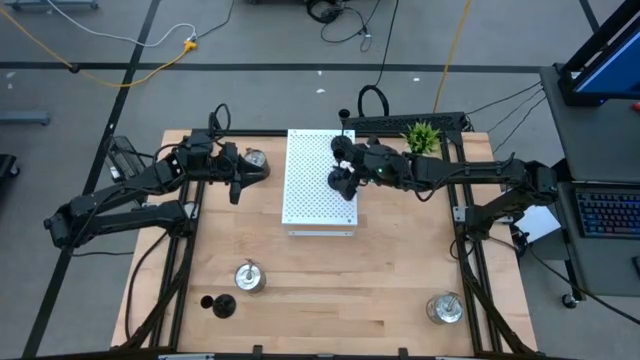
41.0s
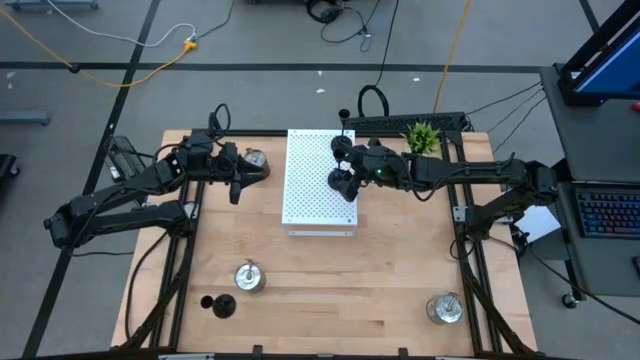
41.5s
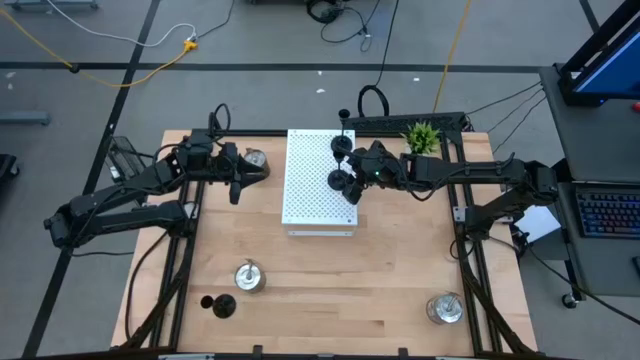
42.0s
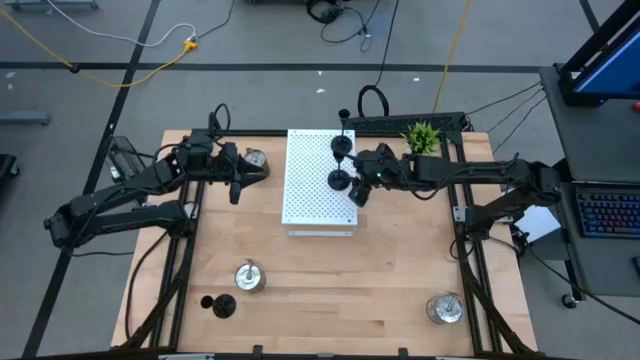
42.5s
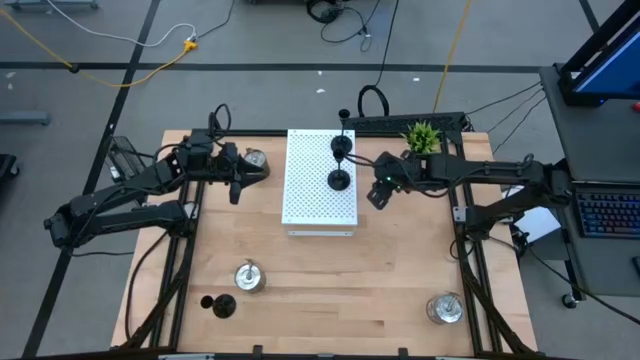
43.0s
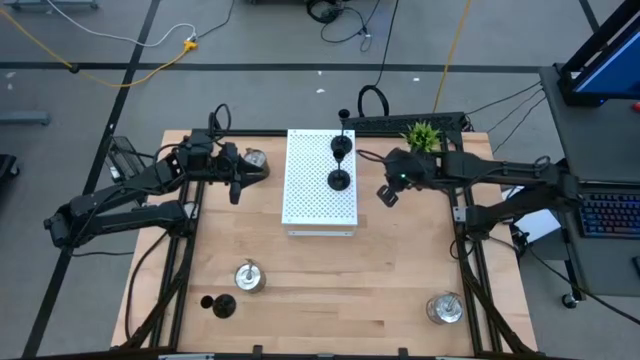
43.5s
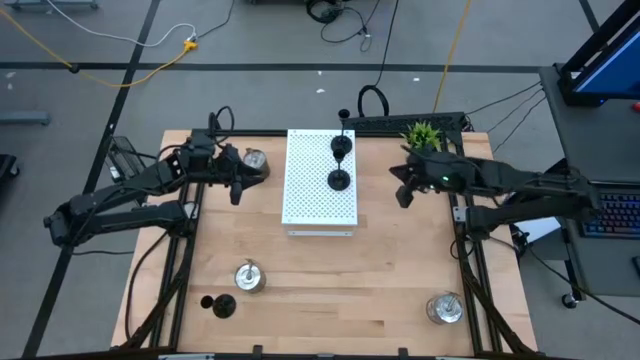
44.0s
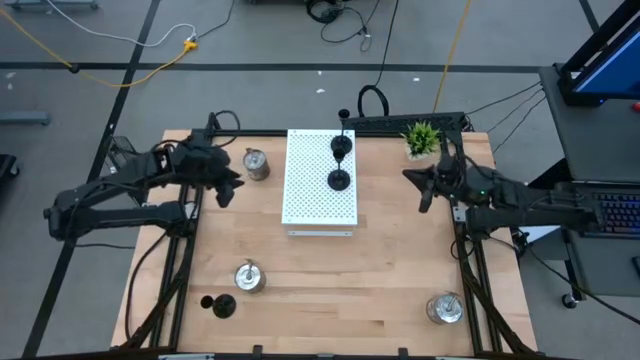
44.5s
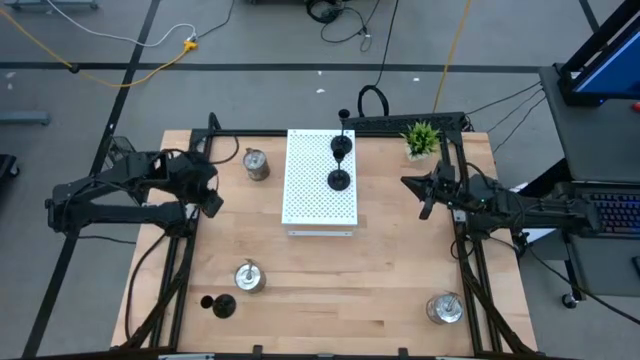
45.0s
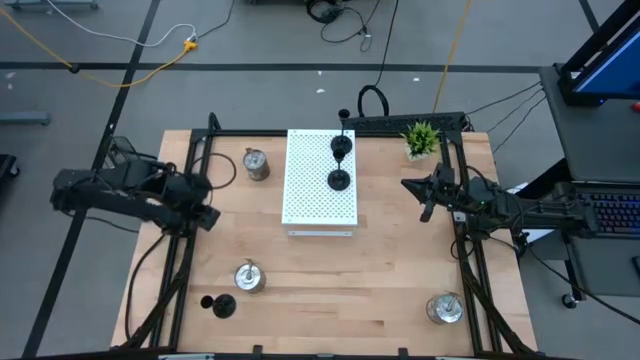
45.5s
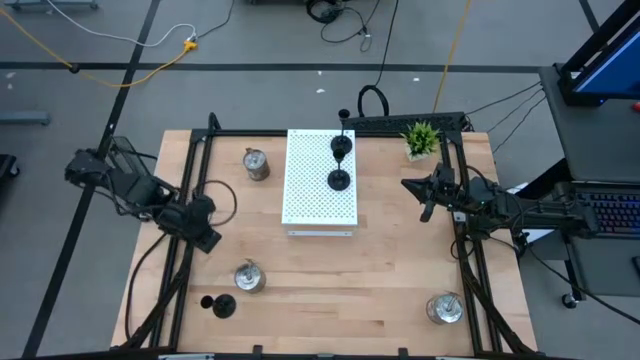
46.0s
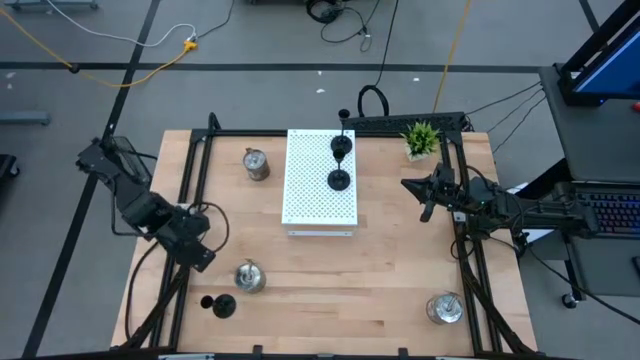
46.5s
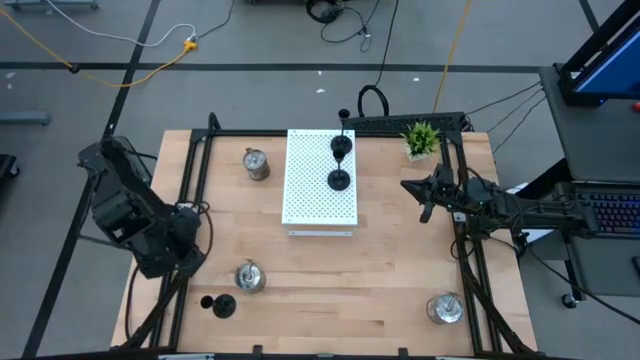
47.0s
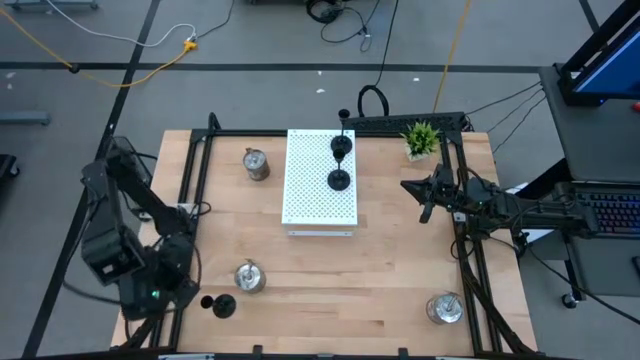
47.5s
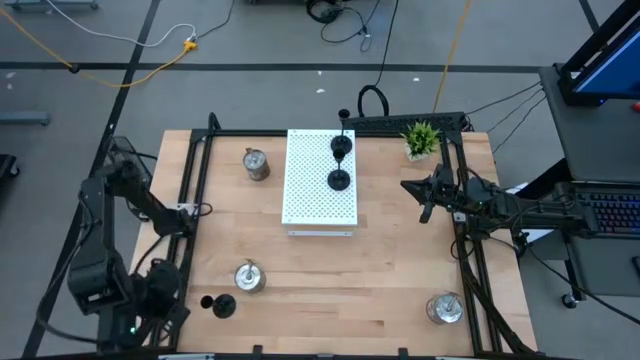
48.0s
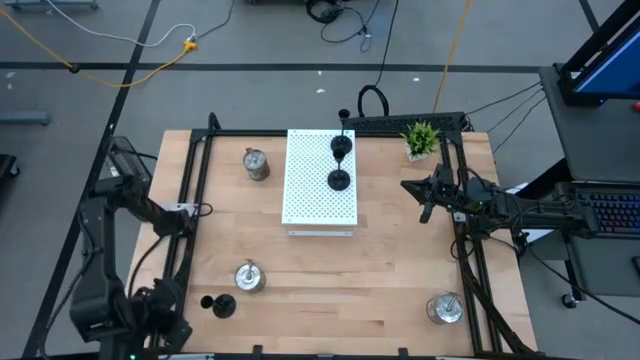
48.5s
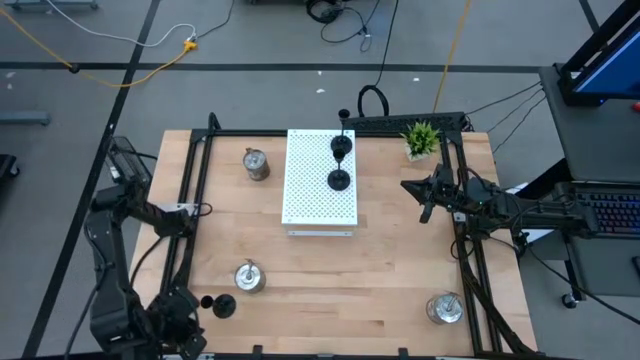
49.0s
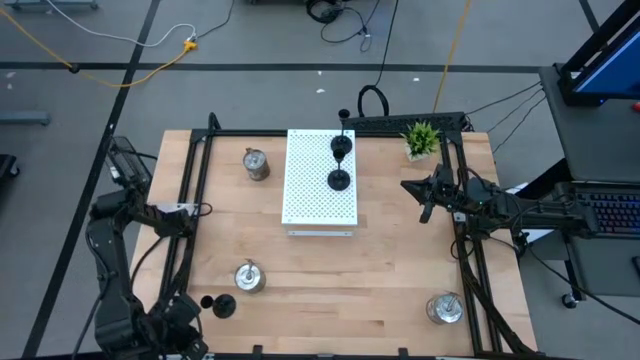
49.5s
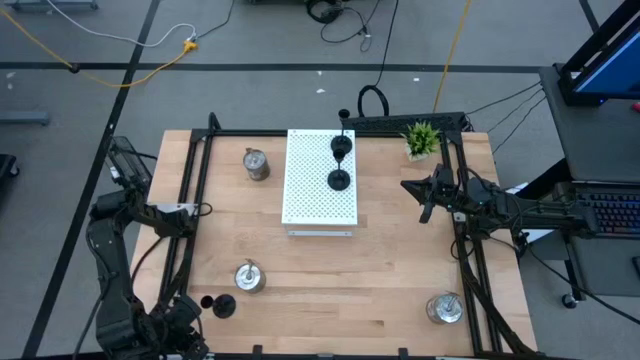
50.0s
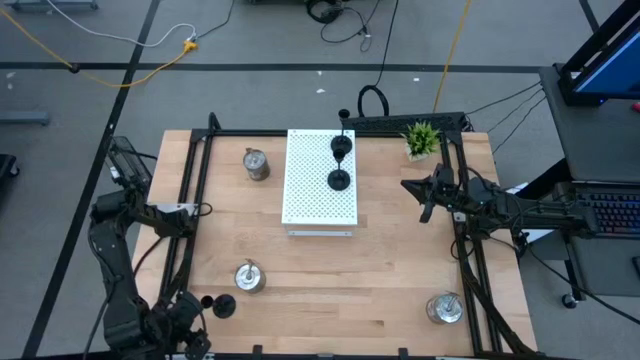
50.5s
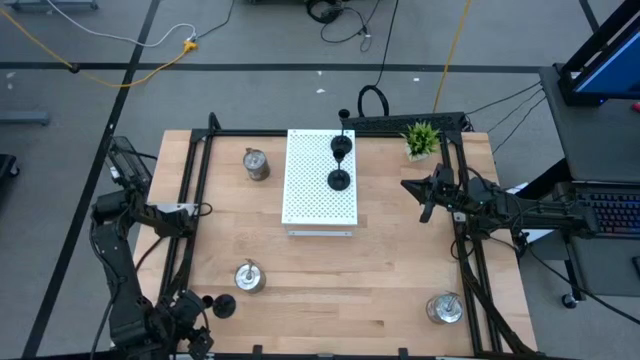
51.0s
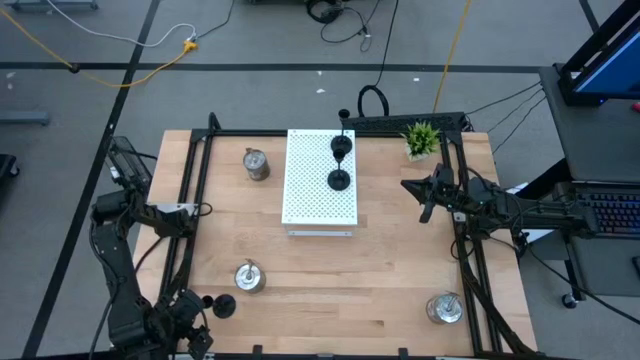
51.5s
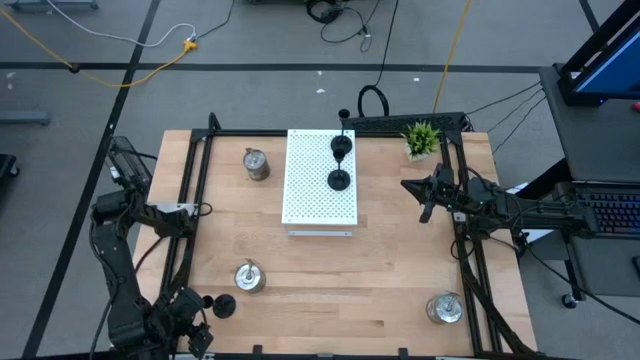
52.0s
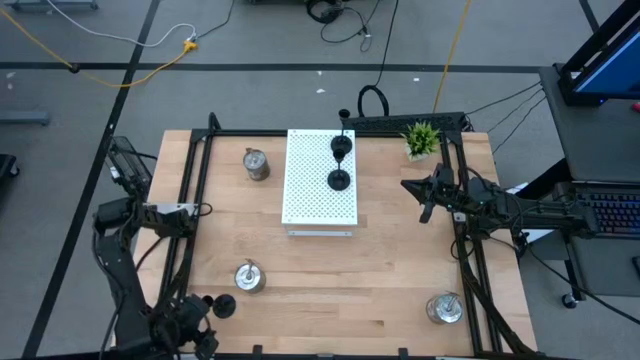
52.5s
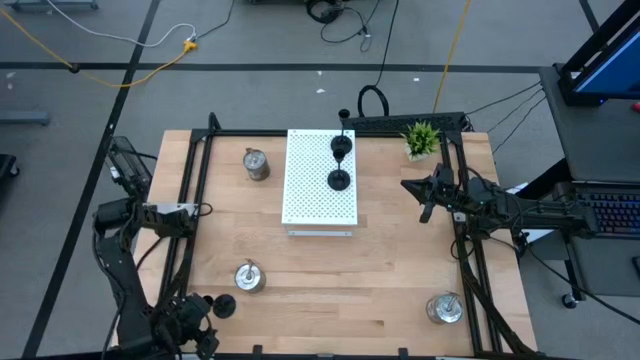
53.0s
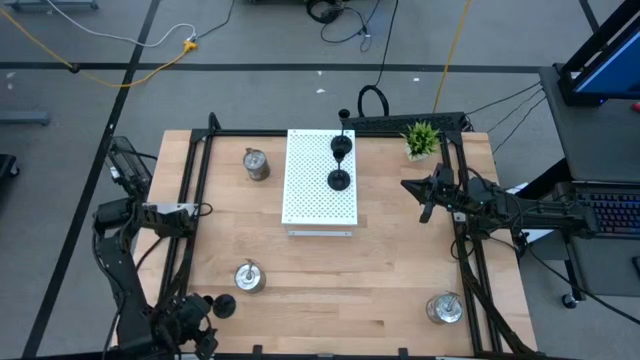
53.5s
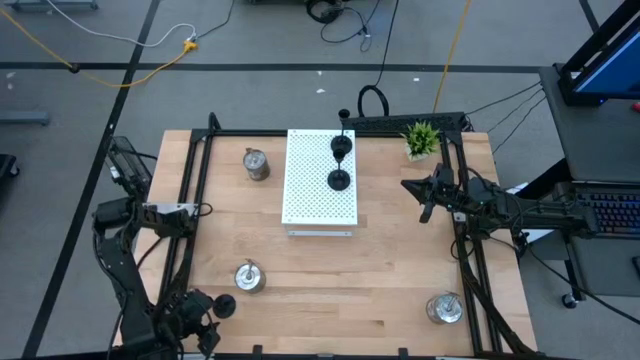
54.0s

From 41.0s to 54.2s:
Task: Pick & Place candle stick holders
Put the black candle holder on the shelf aligned with the other black candle holders
